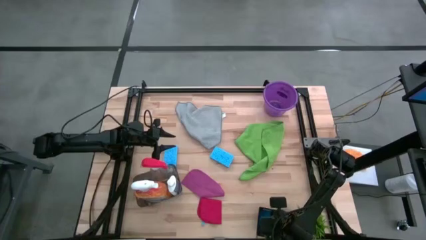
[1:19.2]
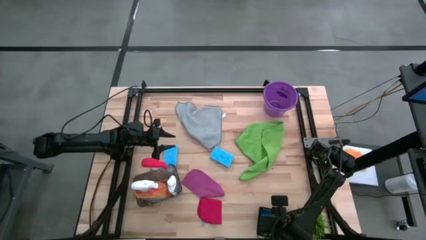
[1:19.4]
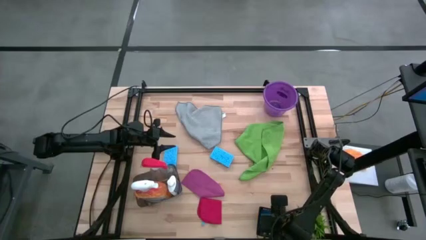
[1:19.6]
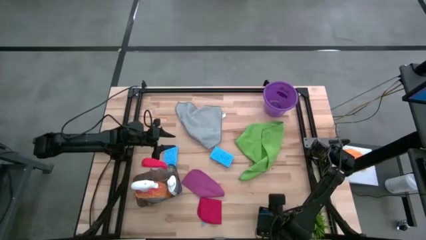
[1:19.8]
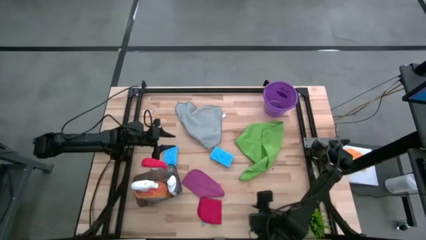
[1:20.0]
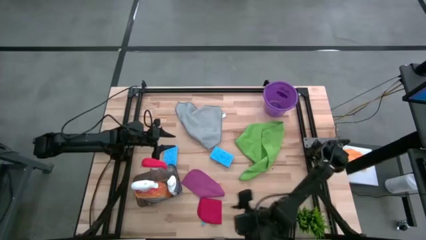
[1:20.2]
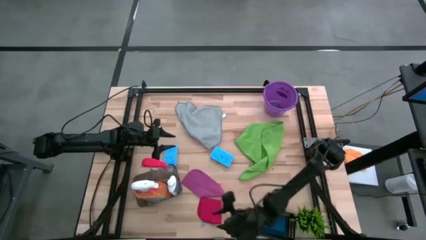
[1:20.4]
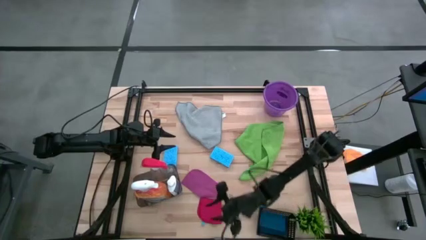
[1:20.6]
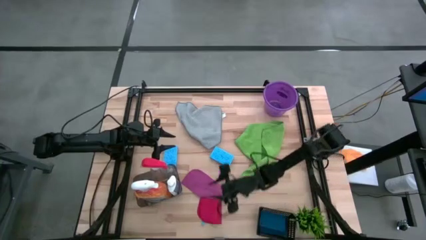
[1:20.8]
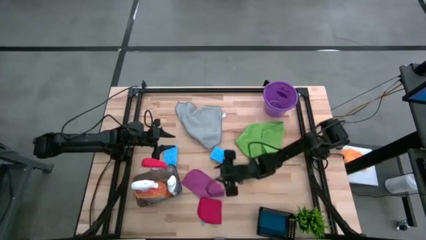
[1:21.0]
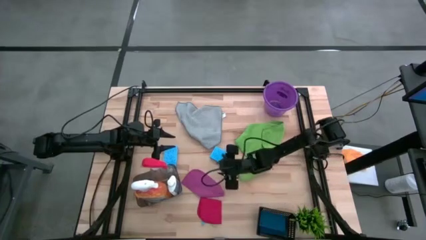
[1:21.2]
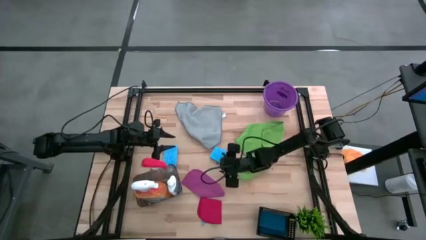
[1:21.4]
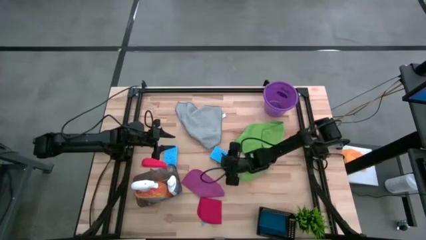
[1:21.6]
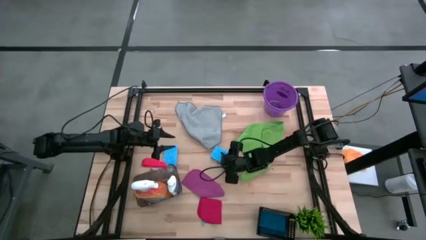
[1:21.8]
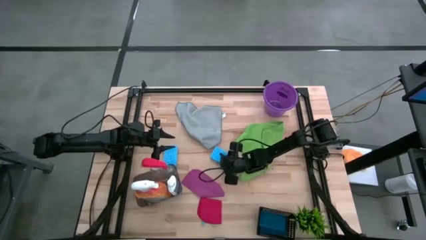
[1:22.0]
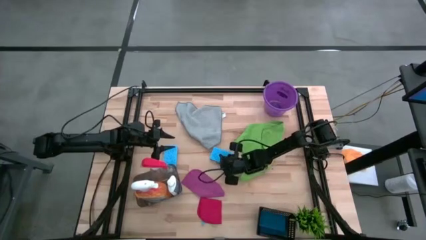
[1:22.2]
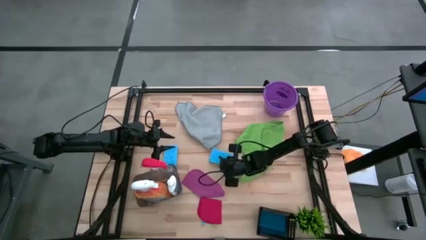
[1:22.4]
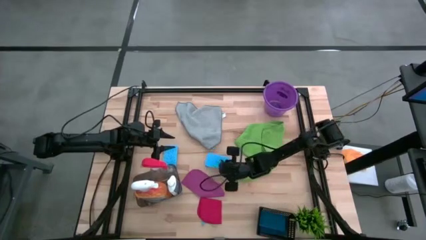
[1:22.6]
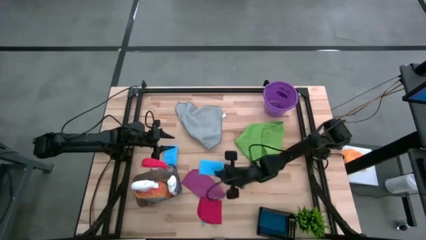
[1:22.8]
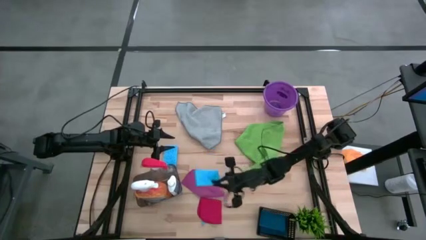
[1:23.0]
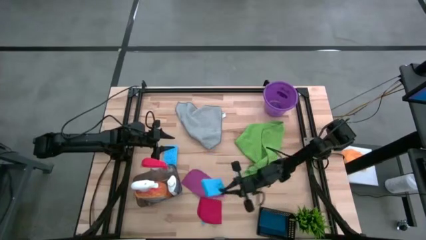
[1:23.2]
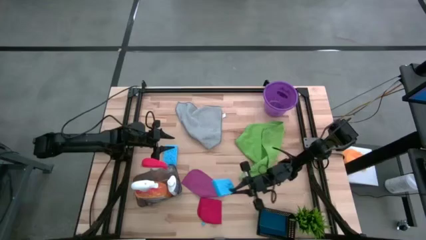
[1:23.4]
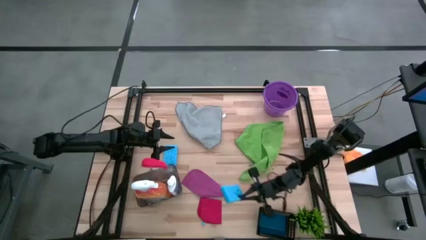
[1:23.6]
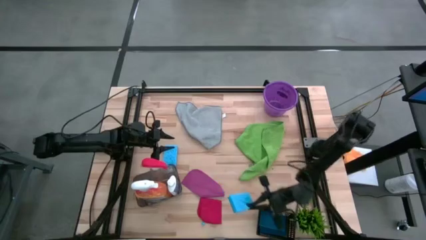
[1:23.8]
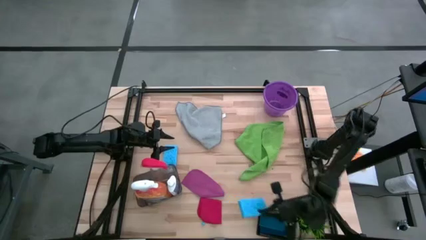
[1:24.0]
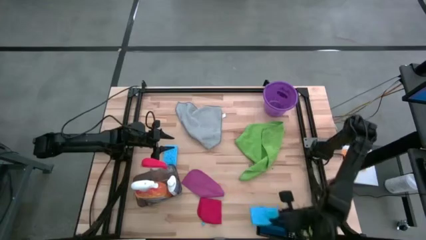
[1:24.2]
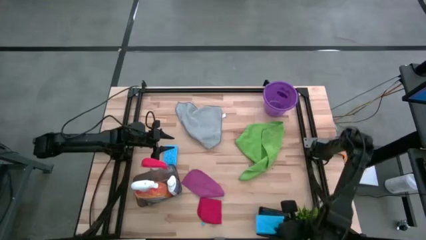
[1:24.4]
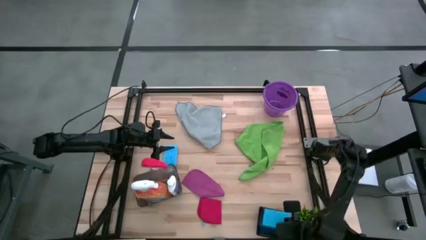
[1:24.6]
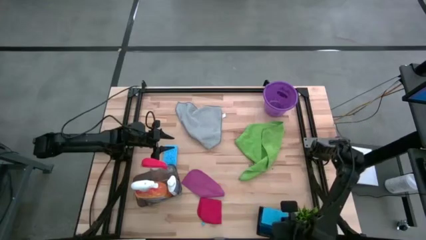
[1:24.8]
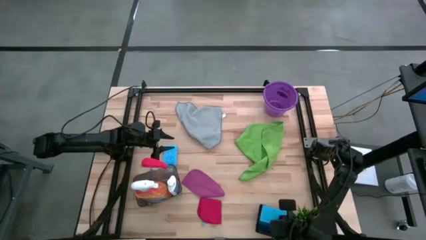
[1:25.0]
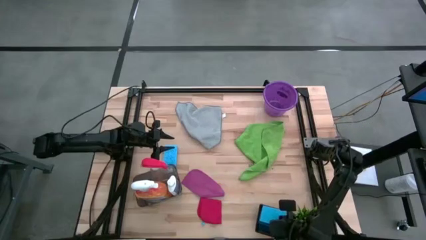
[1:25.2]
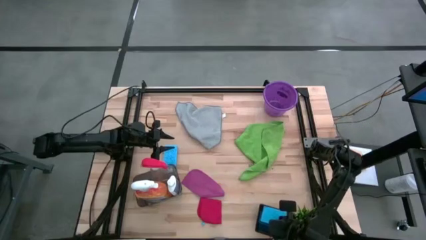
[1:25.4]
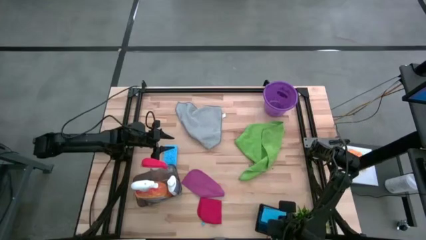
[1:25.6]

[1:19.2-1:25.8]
Task: Pick & Place Kitchen Items
Put the right light blue sponge into the black bin

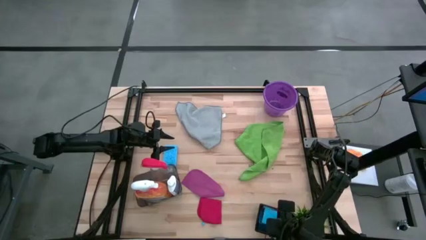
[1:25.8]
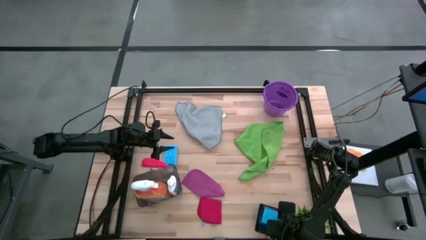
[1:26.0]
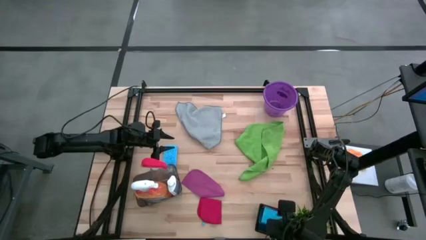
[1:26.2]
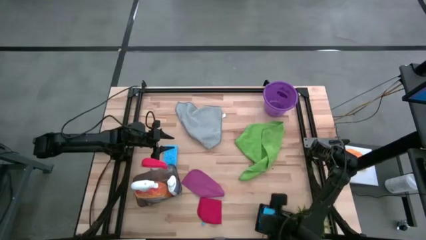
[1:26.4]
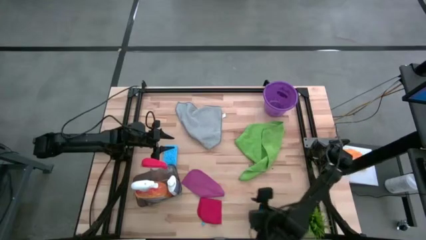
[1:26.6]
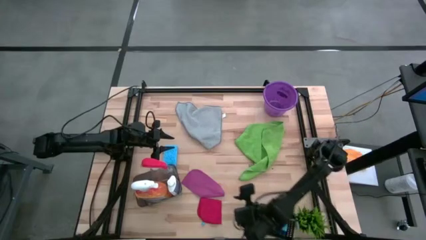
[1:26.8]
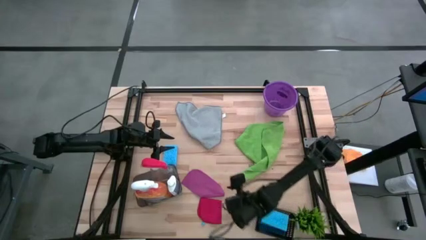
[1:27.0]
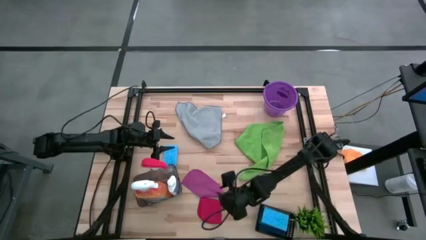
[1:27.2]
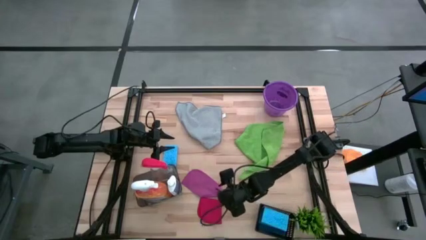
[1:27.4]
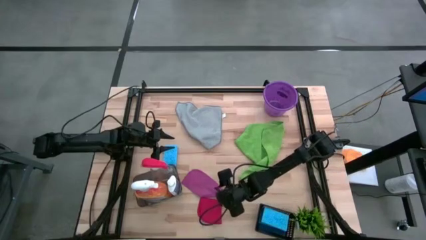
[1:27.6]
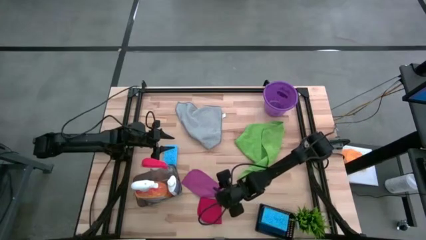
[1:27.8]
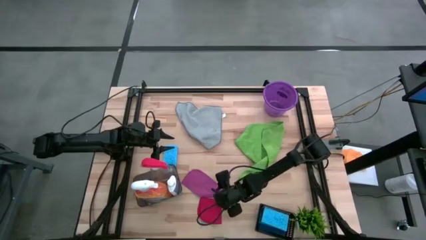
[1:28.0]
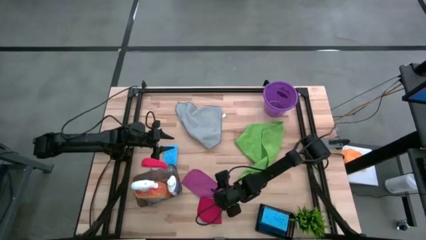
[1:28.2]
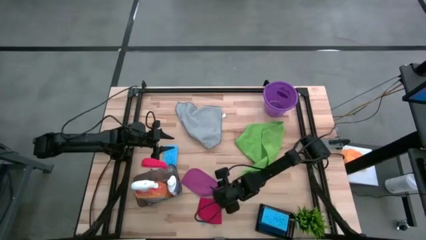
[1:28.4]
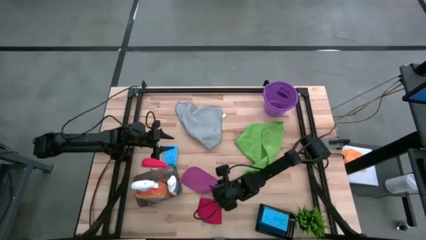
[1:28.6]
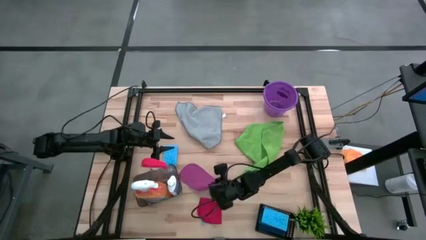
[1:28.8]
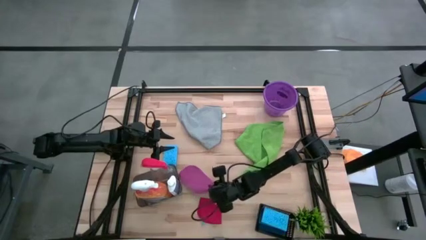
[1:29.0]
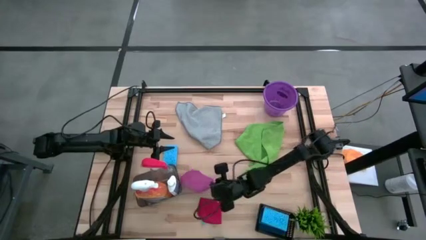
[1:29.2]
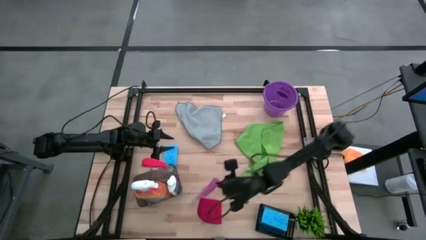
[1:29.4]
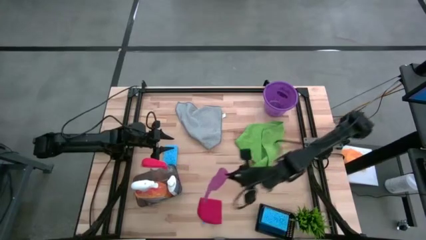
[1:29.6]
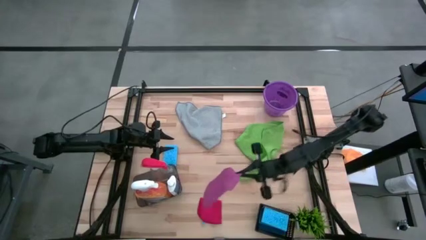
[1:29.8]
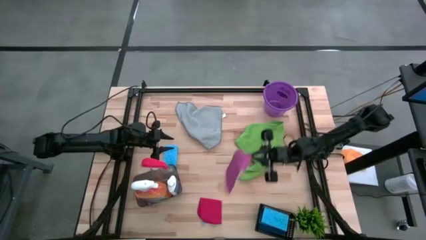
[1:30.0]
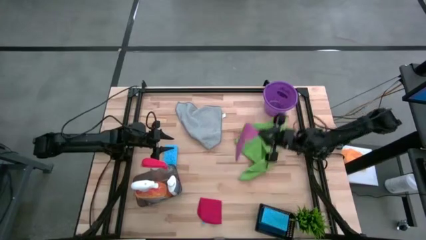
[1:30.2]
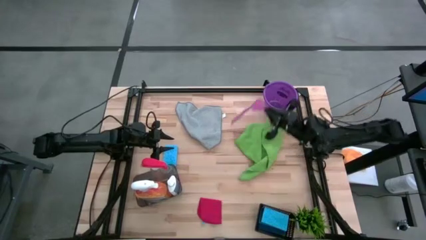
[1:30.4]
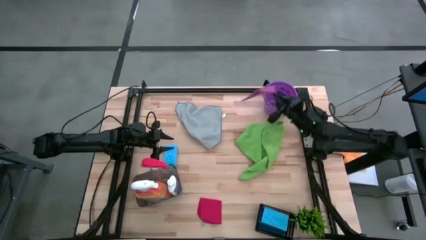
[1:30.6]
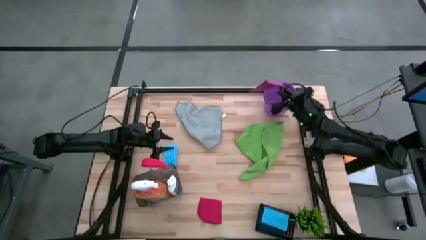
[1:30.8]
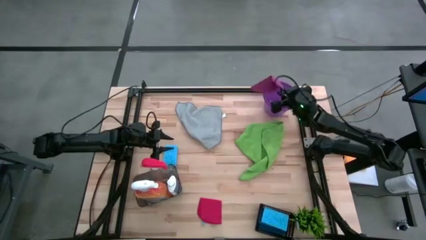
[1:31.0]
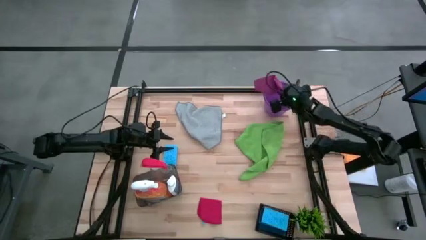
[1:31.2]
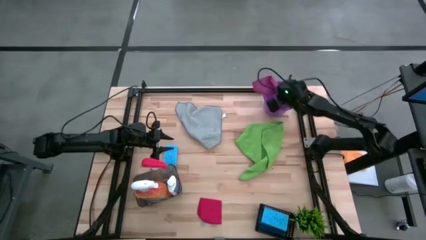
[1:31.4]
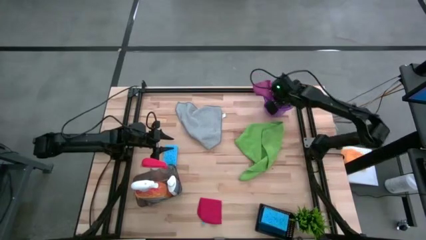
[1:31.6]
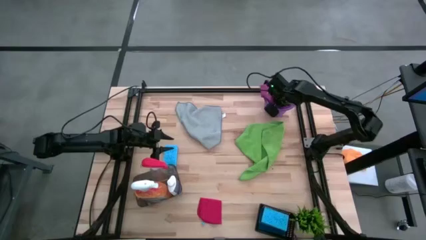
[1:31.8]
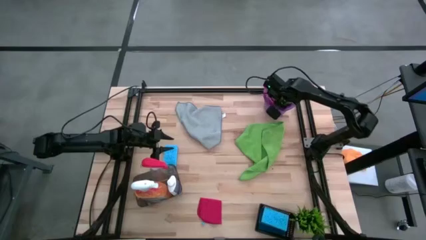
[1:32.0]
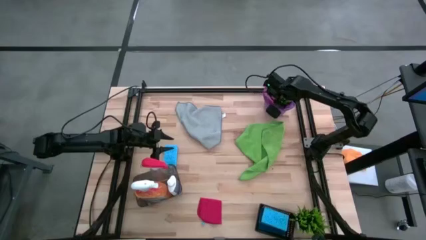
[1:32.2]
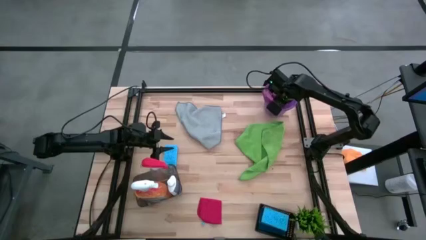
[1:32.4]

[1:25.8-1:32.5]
Put the pink microfiber towel into the purple bucket
